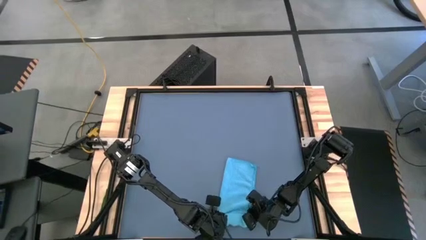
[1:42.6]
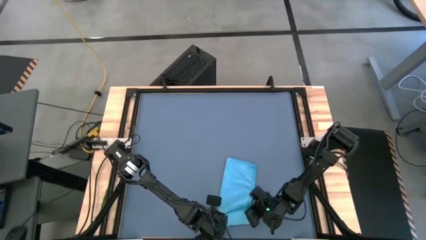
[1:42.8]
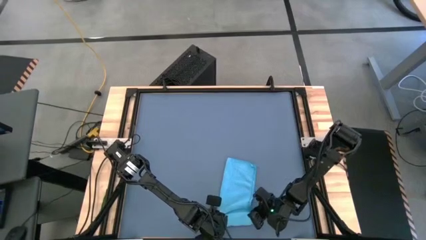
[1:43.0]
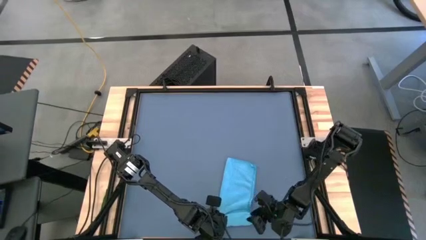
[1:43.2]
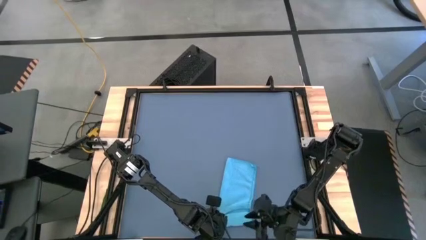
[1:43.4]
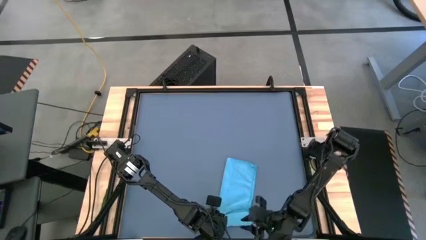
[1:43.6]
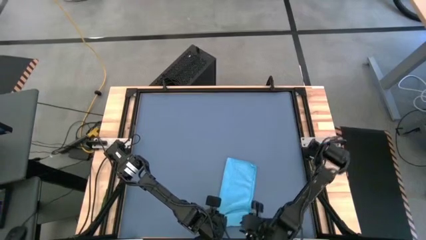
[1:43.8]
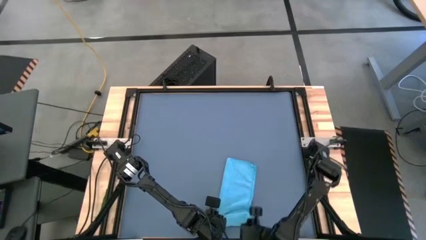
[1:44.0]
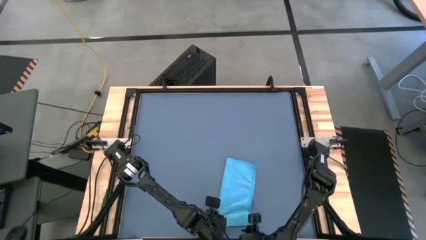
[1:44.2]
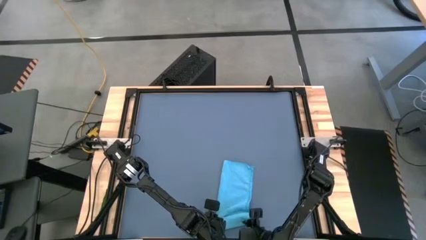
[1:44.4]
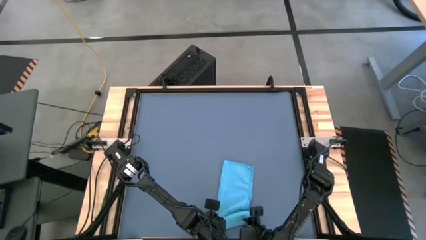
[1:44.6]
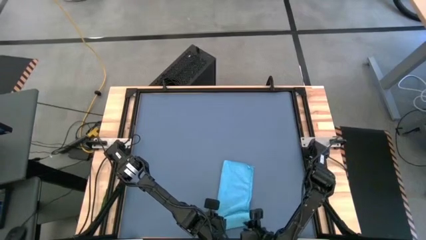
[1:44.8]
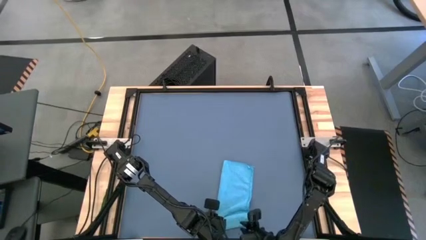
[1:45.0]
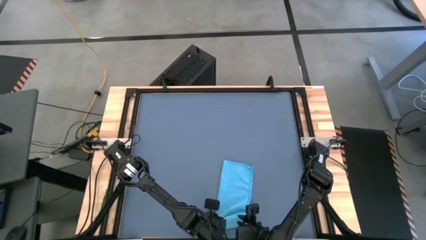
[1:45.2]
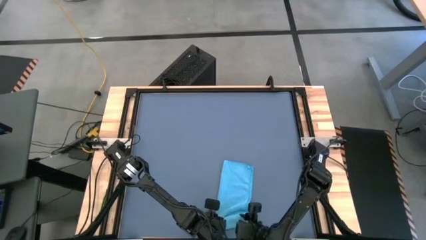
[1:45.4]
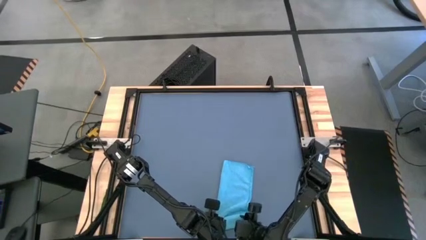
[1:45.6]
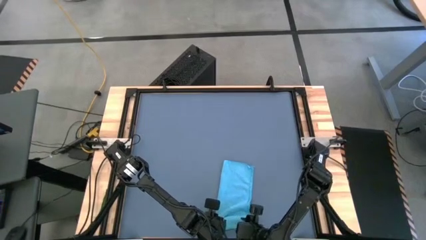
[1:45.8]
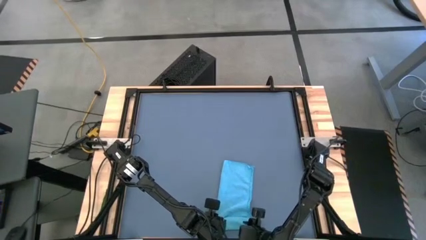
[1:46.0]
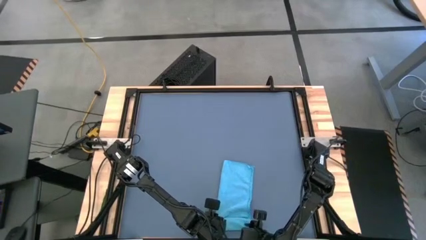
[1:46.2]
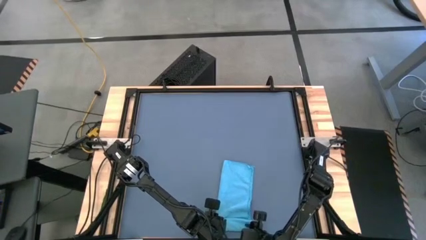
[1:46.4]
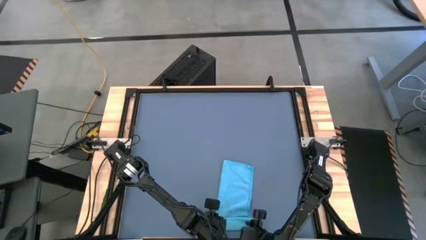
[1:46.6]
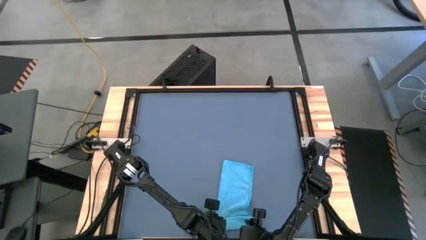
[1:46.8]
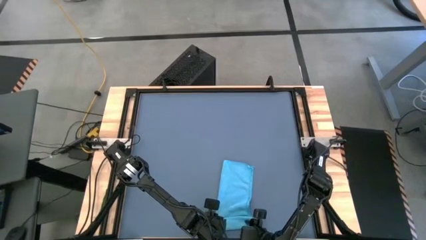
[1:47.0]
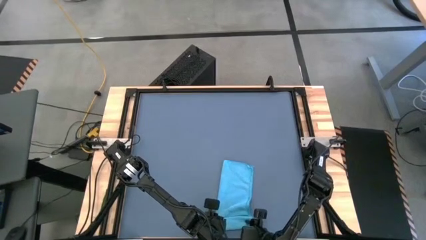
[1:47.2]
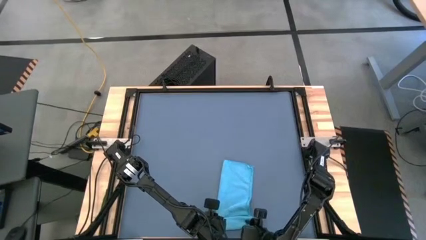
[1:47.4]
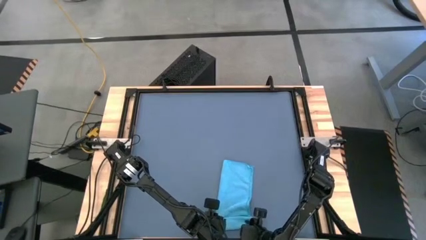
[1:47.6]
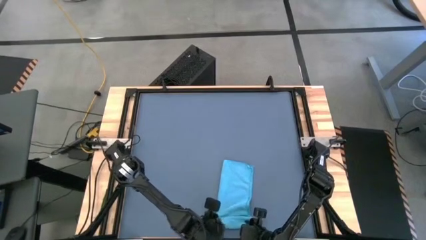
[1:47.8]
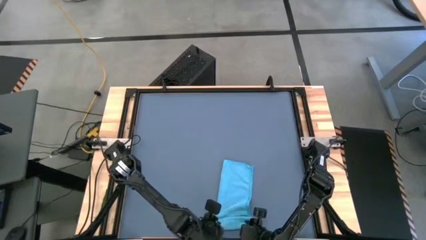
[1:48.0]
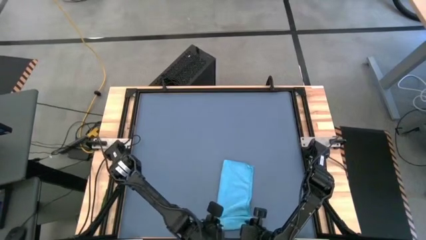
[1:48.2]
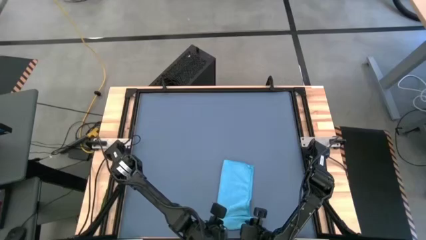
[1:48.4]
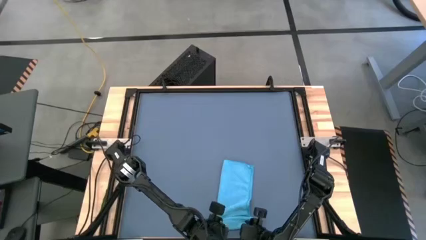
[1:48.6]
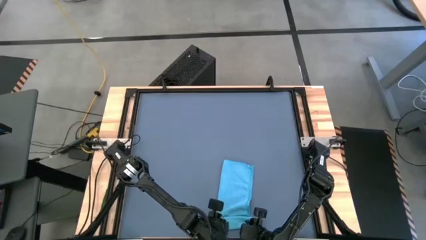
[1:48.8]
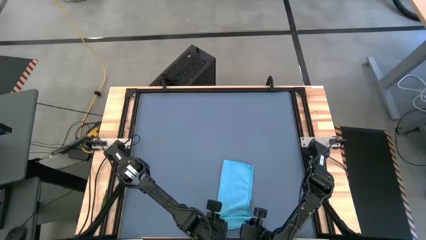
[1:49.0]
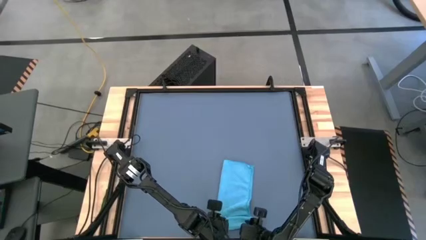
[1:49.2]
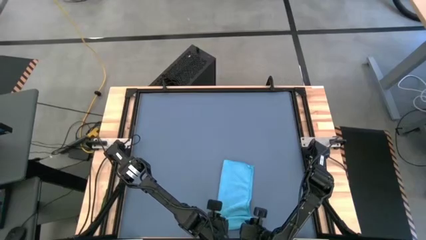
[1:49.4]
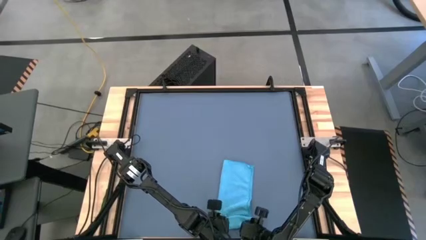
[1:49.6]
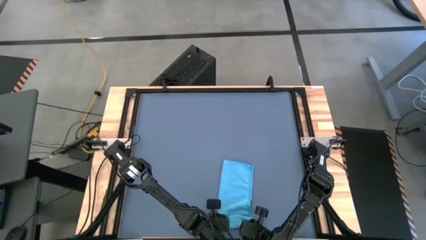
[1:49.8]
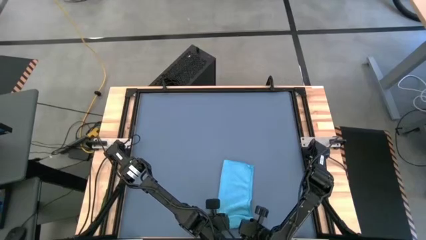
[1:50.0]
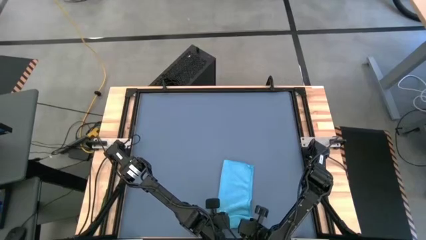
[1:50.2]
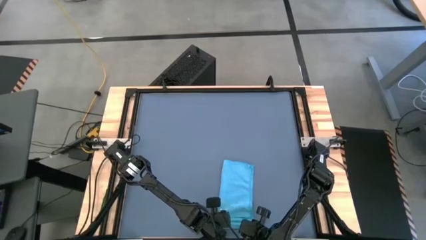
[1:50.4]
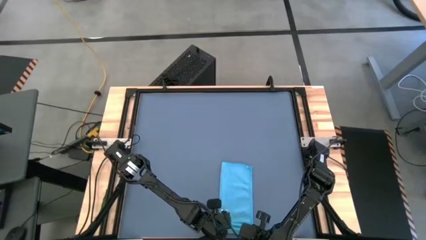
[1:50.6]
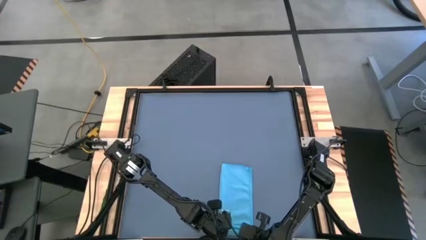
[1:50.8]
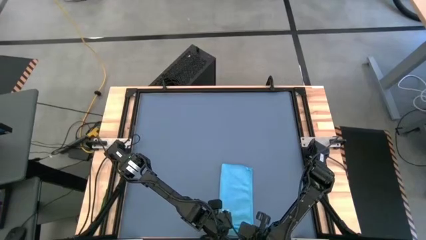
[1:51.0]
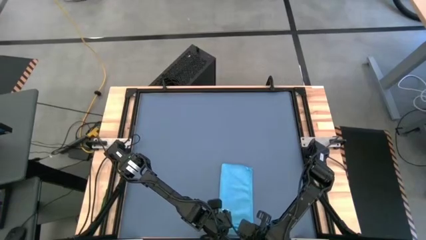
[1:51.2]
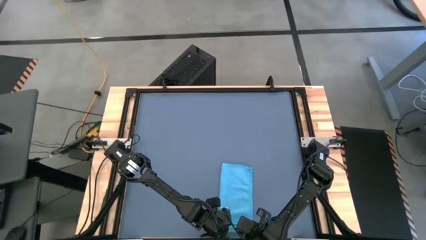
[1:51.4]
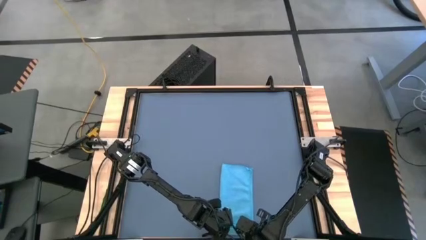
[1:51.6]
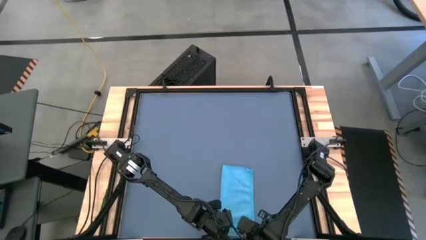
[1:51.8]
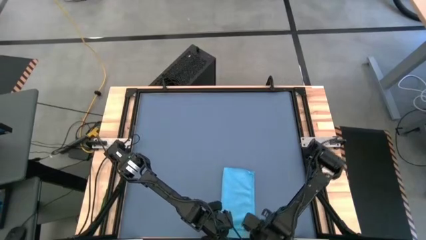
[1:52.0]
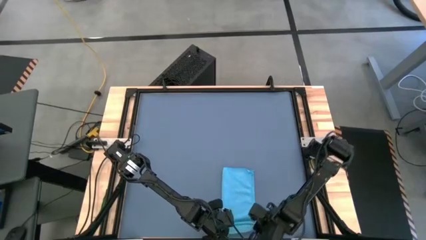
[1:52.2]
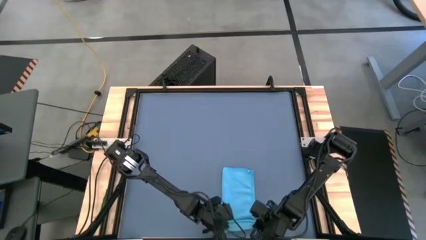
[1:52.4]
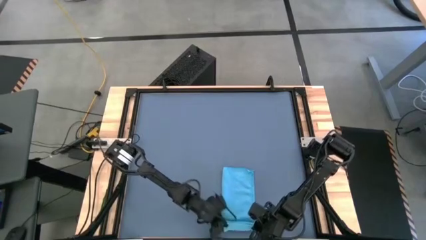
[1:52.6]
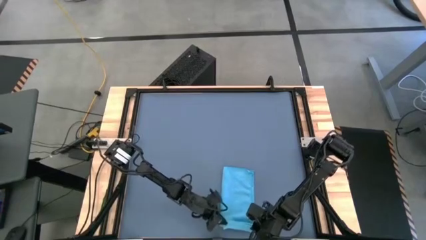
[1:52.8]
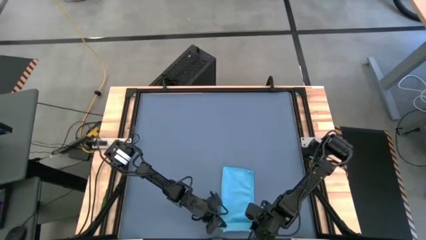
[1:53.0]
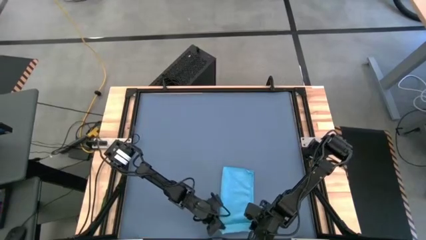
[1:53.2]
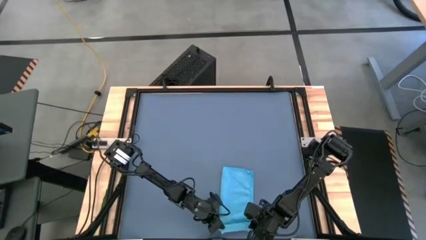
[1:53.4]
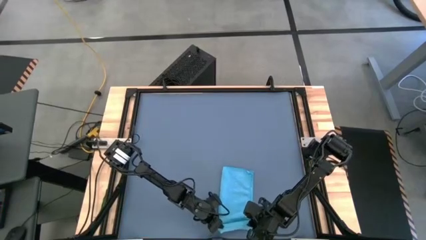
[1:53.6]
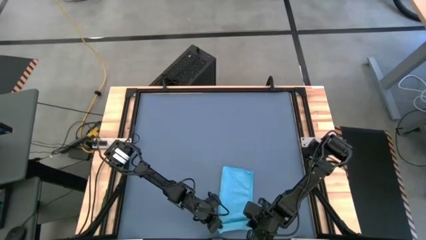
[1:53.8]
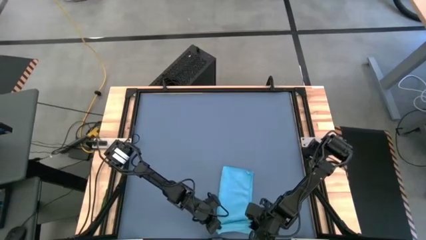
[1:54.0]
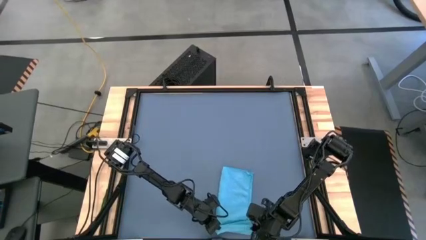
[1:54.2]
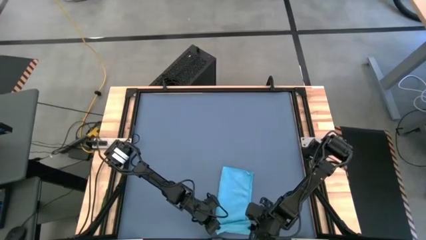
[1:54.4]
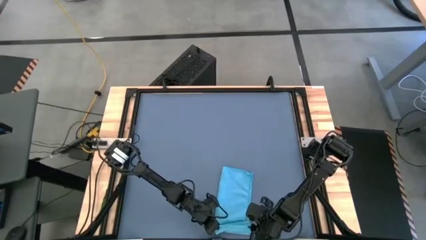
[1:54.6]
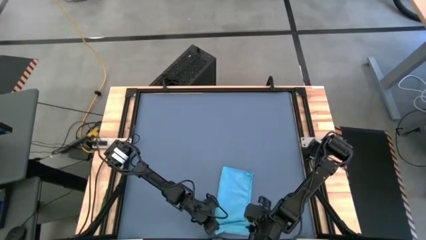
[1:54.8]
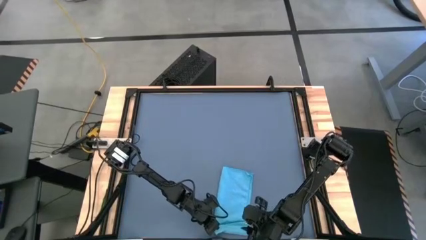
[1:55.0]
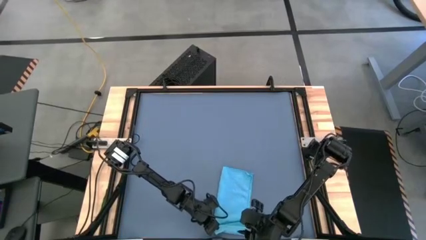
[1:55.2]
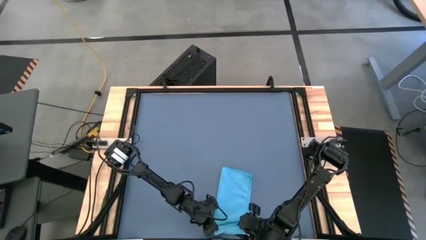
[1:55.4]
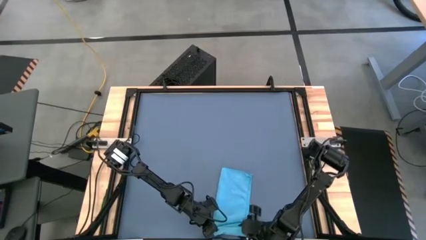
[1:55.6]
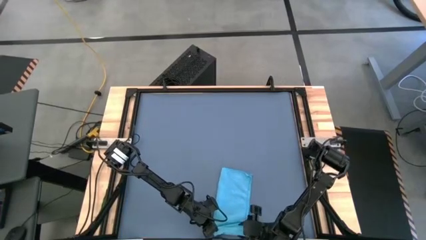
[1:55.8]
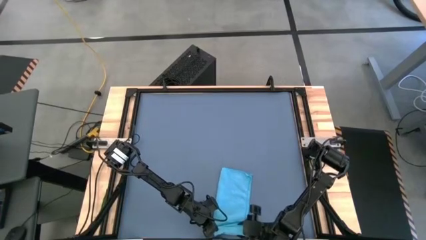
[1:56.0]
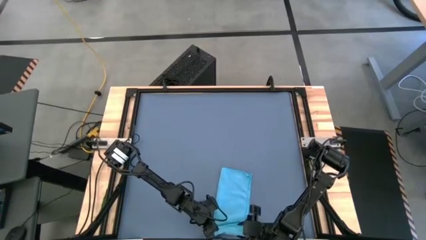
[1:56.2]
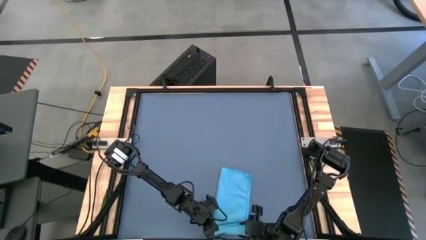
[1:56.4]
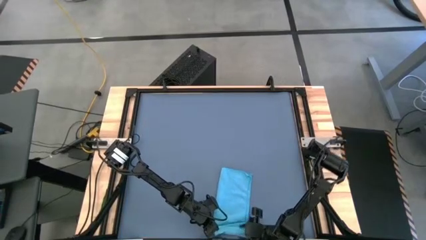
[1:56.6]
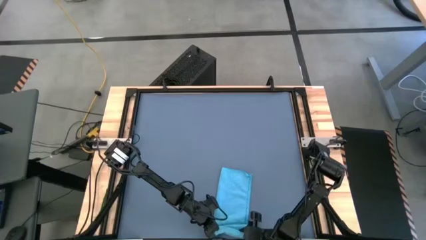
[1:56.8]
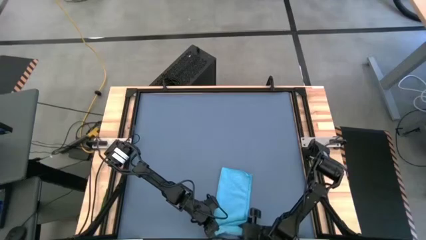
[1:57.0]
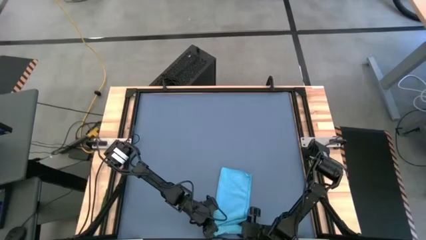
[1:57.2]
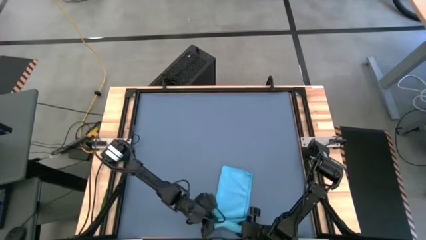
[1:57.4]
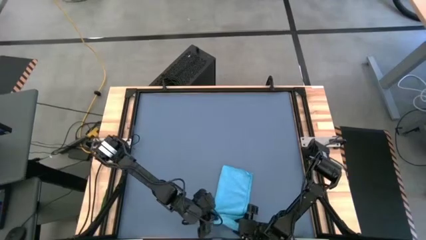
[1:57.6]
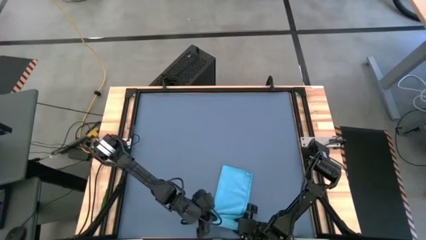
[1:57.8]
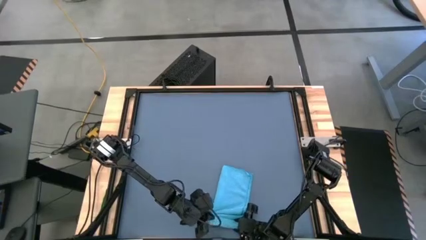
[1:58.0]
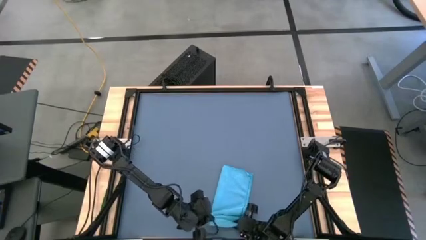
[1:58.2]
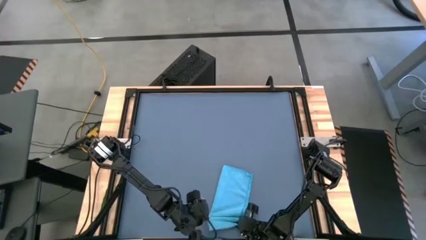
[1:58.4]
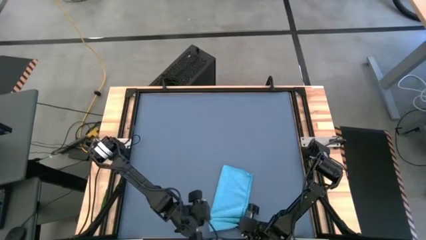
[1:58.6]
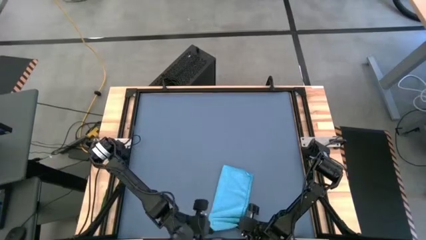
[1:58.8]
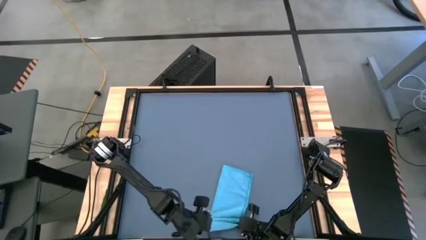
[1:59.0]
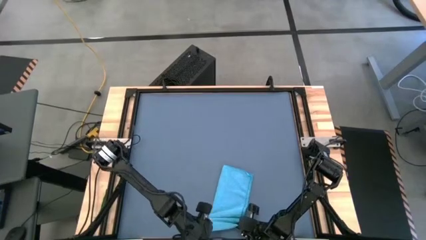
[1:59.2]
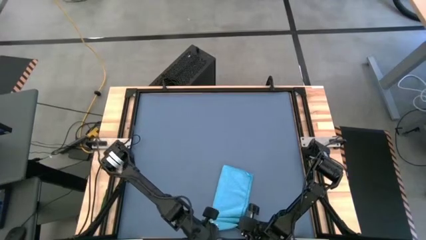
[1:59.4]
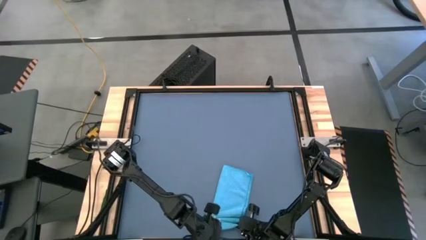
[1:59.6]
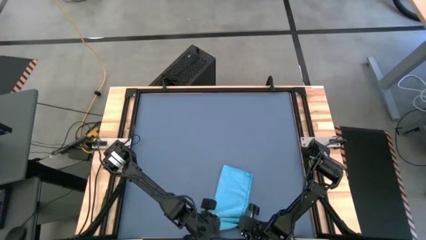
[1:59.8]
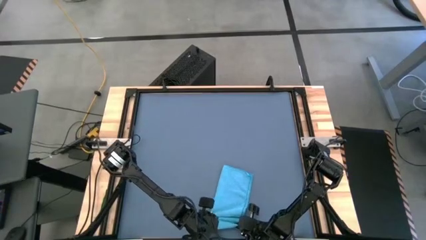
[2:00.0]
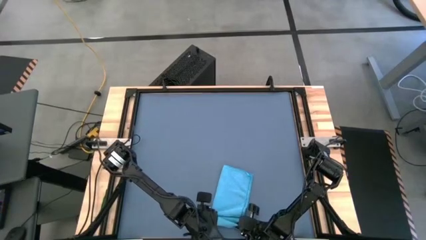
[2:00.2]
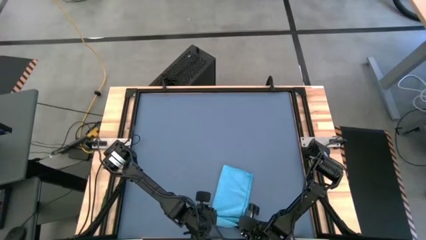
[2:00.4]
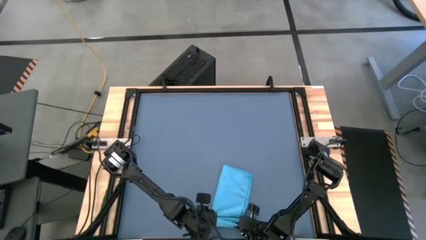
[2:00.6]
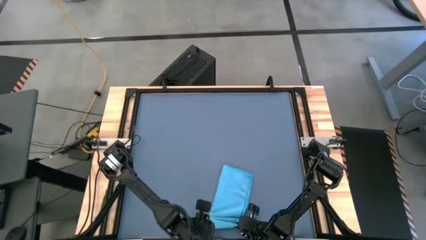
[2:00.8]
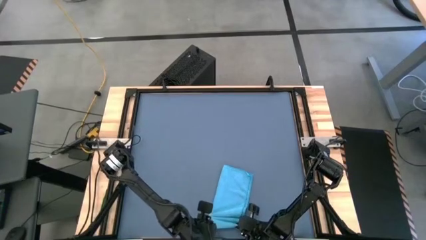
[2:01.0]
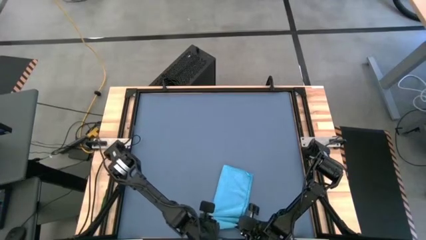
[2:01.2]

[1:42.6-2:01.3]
Task: Roll towel
Roll the blue microfiber towel
